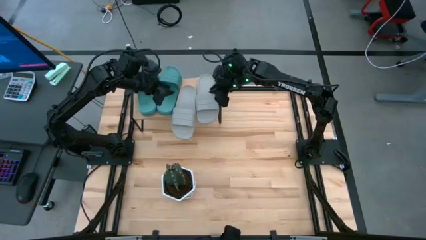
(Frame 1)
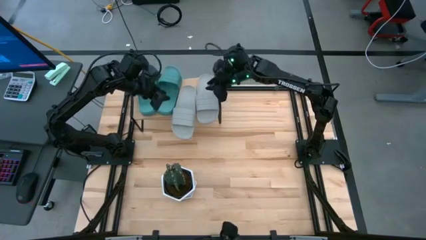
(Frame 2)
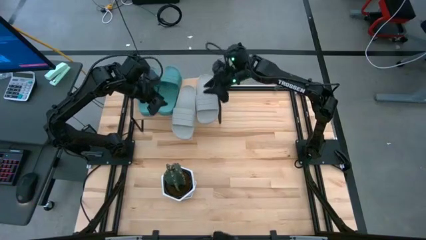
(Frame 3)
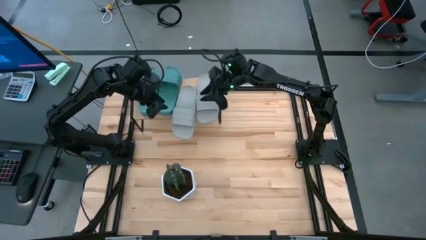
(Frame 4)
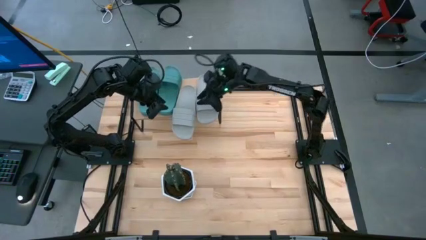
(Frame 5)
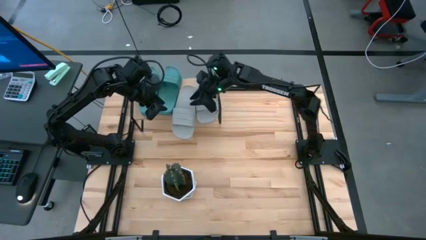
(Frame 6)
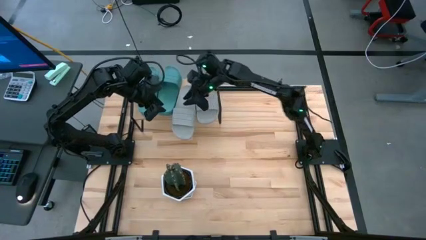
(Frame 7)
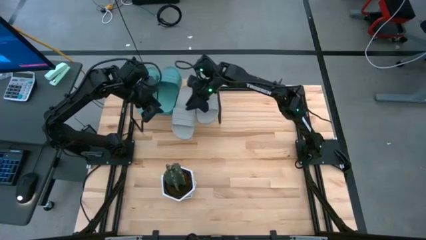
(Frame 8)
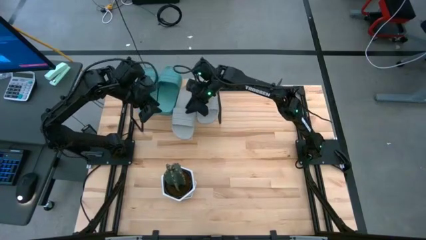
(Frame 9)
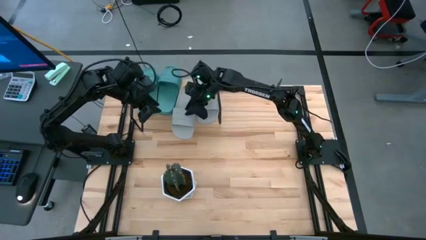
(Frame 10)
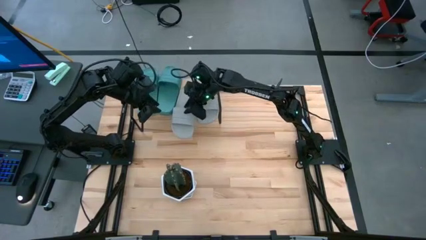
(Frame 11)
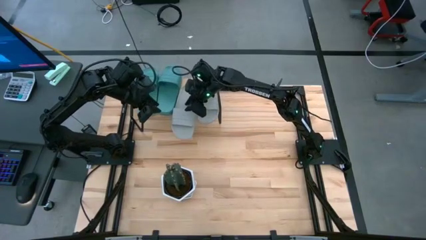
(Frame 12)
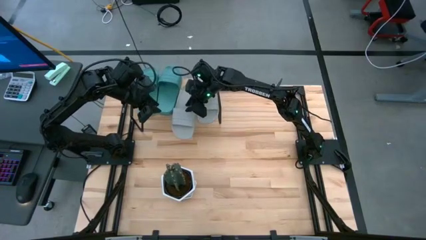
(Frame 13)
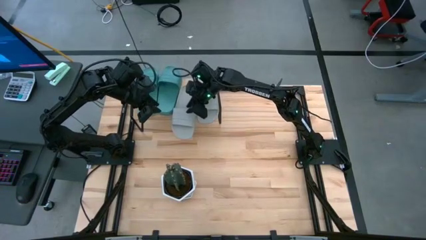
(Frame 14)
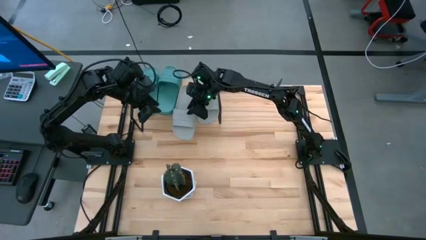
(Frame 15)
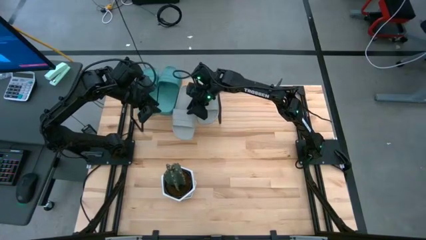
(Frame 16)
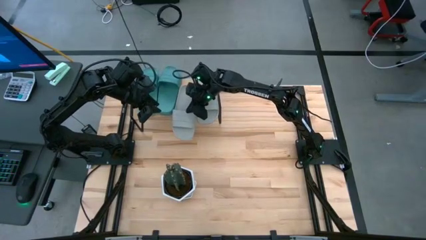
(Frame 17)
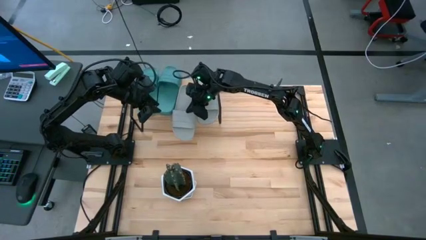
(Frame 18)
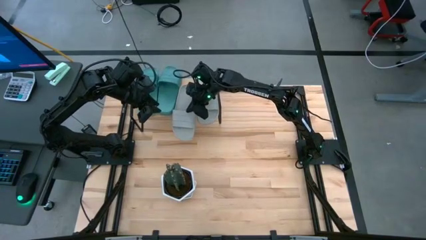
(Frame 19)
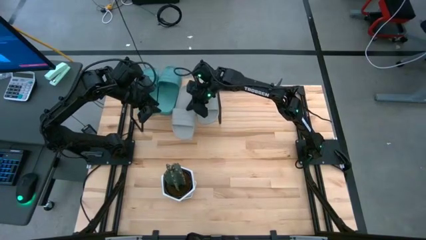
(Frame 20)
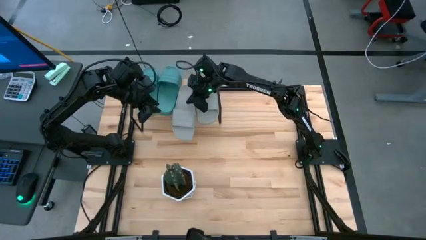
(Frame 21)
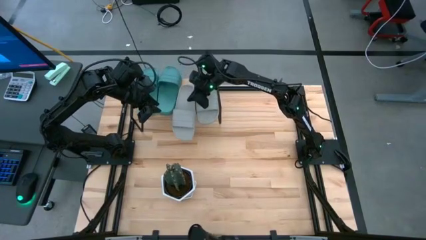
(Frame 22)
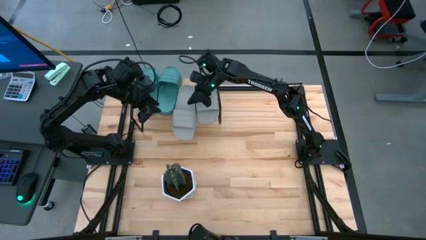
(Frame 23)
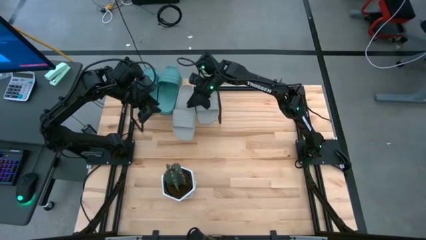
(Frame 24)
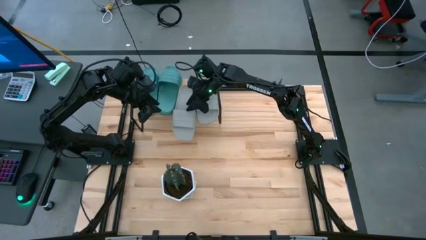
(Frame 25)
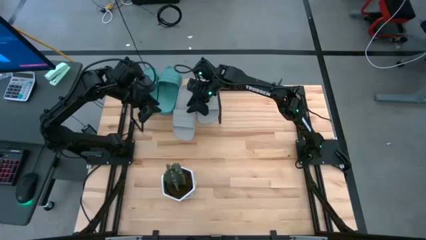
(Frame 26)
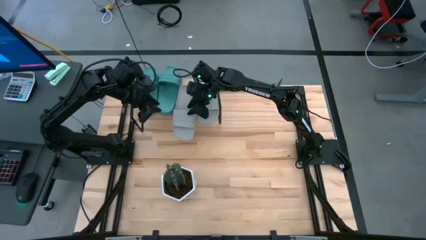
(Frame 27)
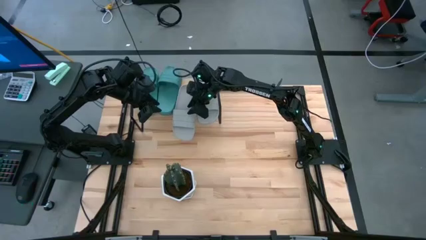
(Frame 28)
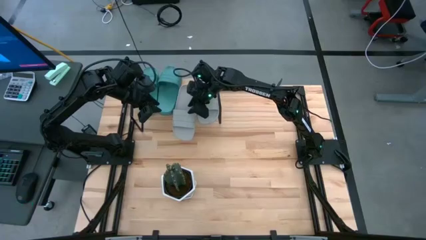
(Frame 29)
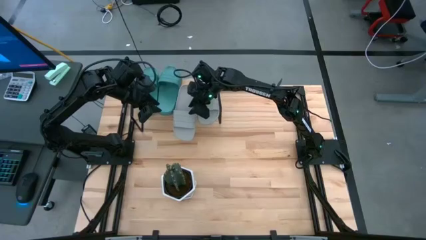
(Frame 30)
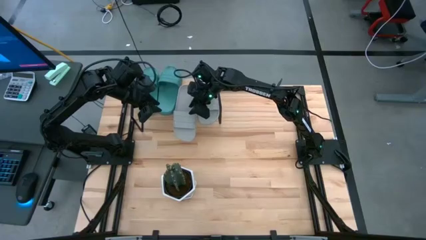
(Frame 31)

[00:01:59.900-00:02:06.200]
Task: Pick and place slides into the shelf
Adjust the gray slipper

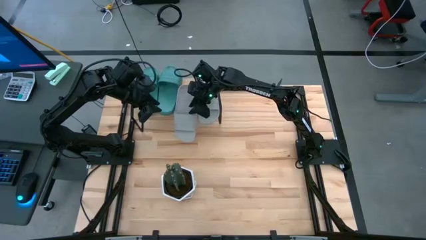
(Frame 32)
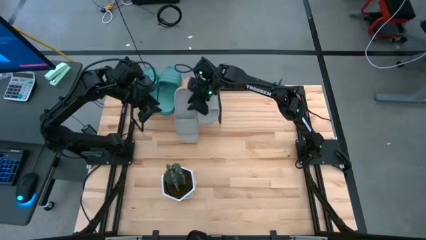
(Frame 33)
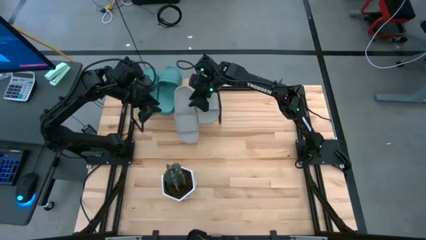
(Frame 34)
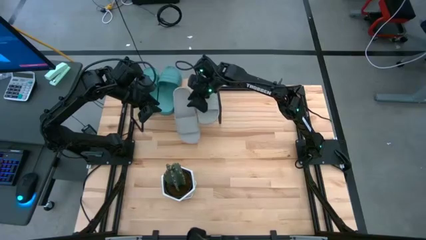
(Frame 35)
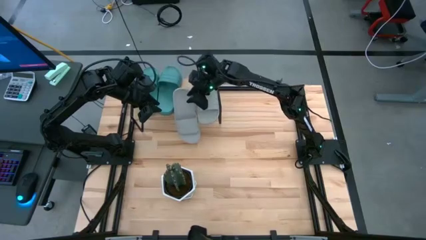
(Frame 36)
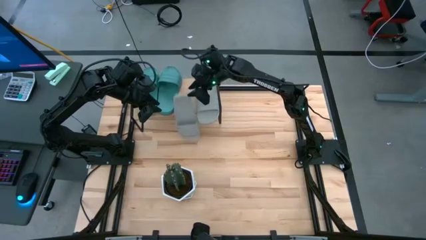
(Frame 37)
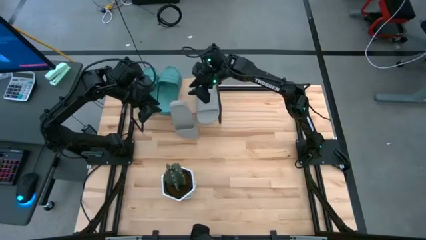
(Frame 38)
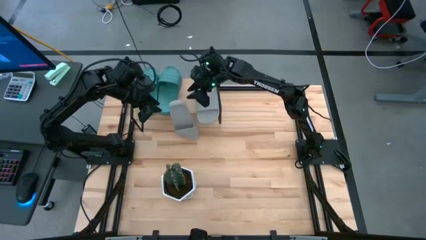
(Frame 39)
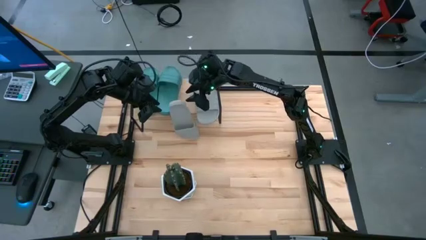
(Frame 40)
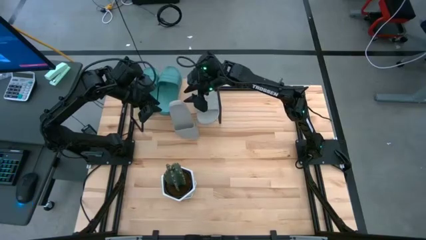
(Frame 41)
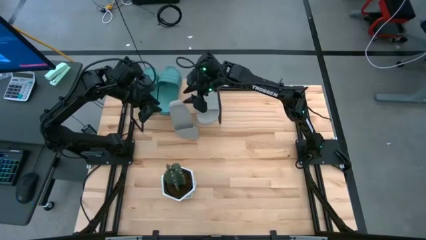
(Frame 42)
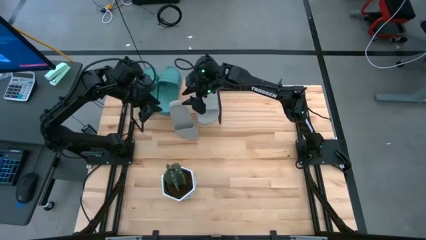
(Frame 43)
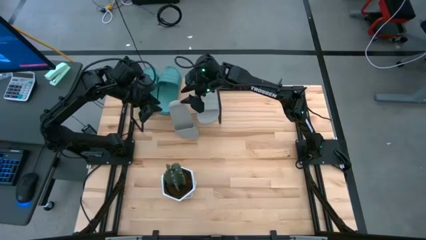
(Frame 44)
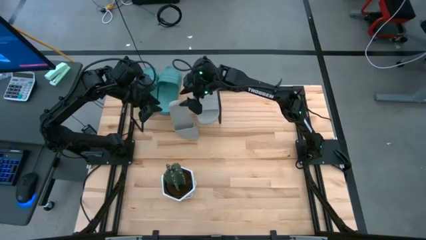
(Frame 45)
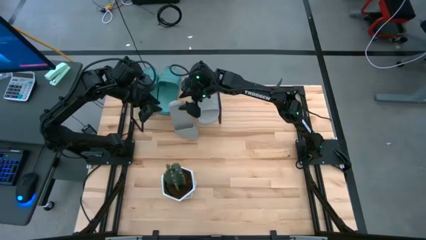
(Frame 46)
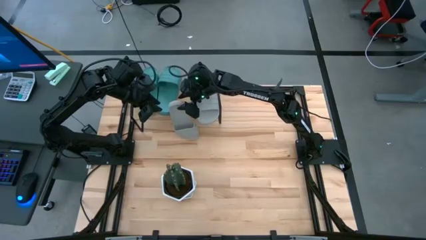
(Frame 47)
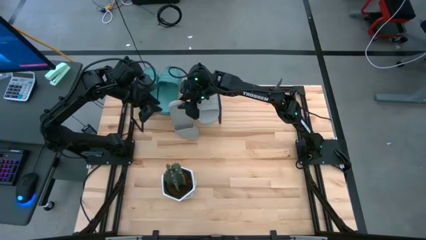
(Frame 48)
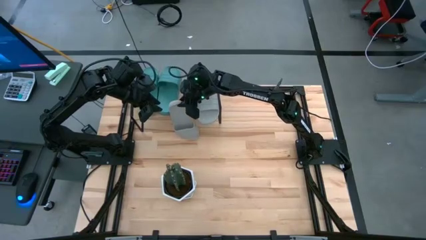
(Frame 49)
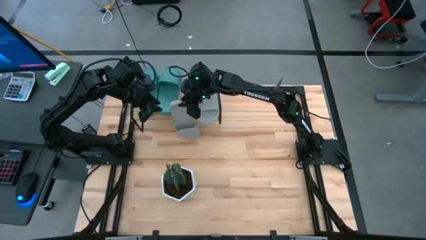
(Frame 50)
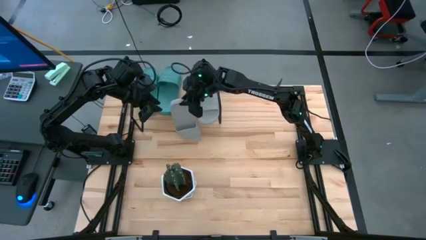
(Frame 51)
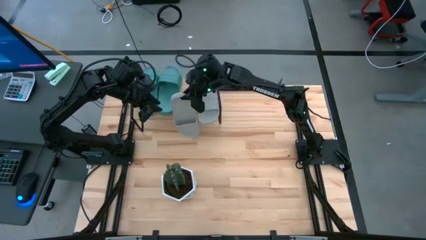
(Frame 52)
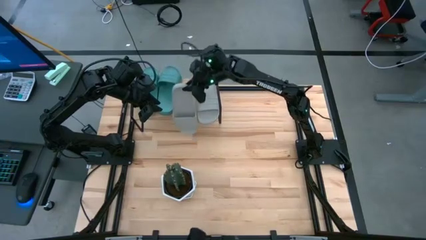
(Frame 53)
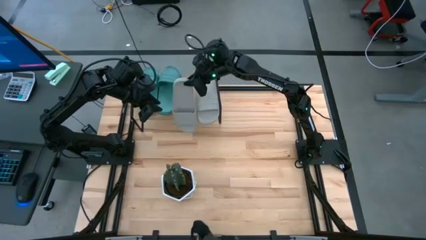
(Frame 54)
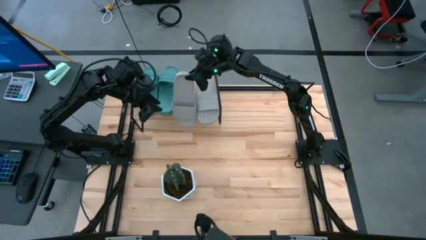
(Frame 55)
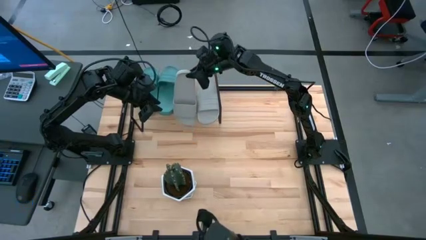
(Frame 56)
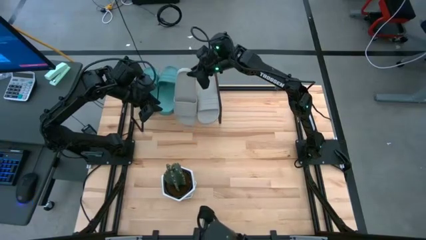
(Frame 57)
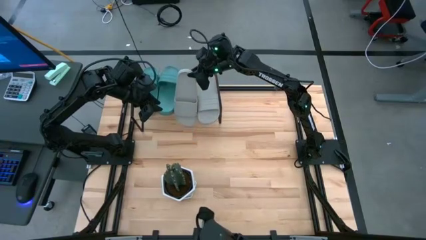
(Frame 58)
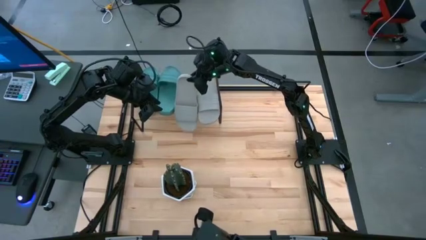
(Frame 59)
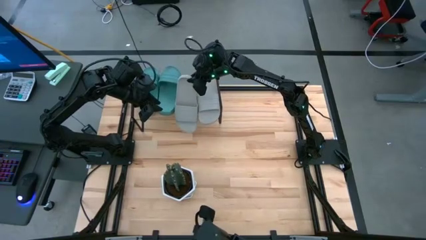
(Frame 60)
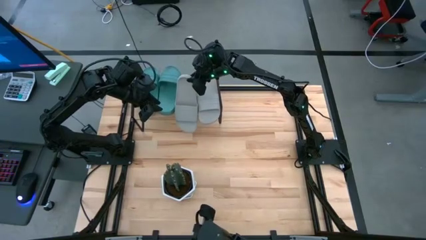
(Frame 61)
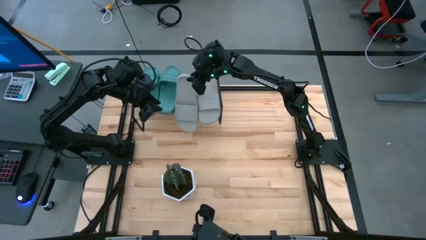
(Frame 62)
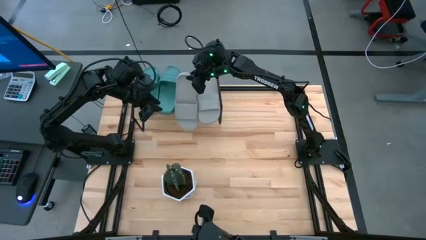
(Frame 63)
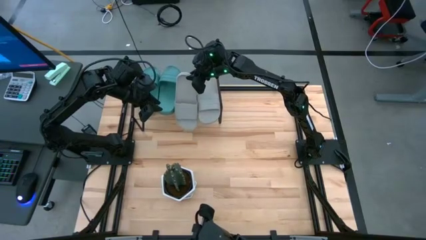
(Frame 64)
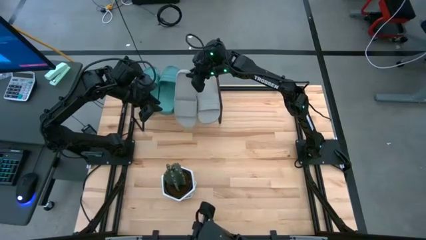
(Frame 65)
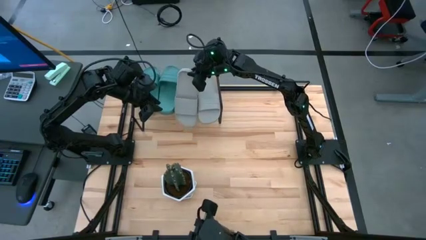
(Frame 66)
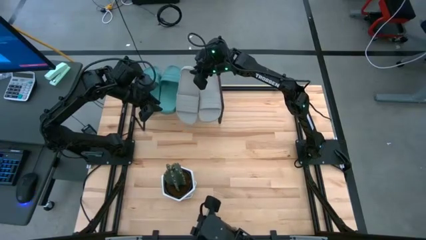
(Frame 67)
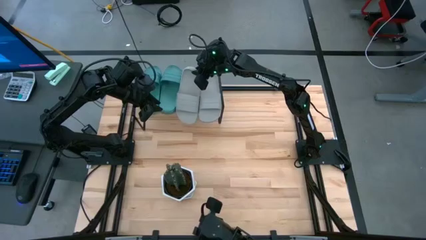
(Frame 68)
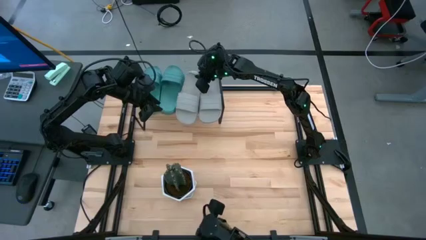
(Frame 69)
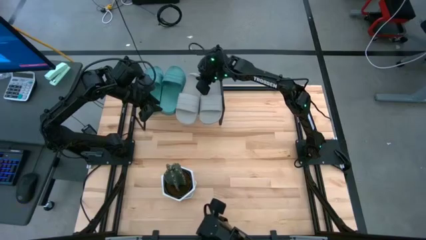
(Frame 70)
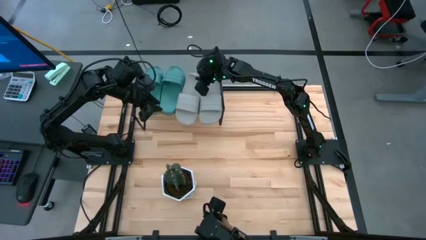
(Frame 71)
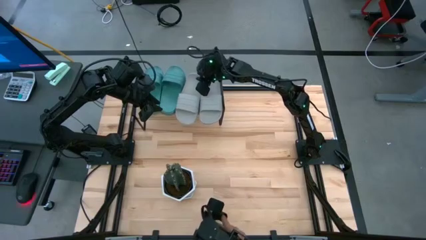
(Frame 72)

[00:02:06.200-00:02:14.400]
Adjust the gray slipper
